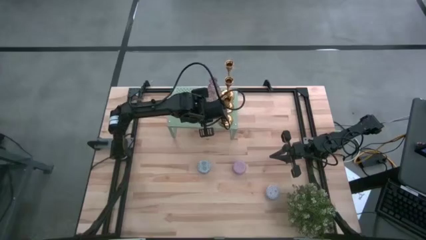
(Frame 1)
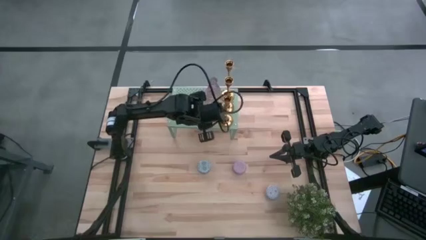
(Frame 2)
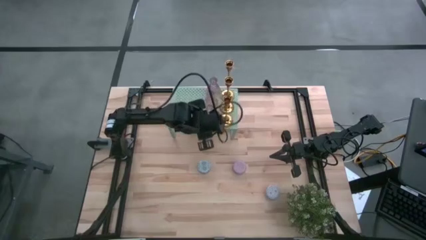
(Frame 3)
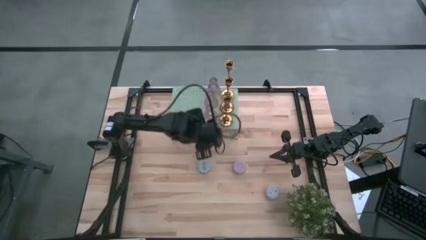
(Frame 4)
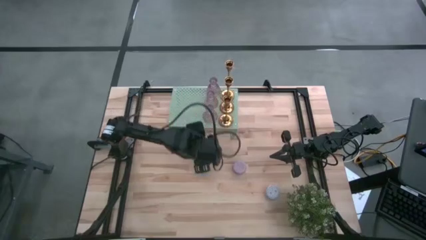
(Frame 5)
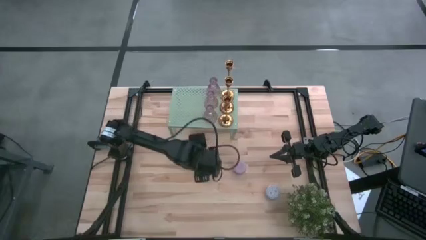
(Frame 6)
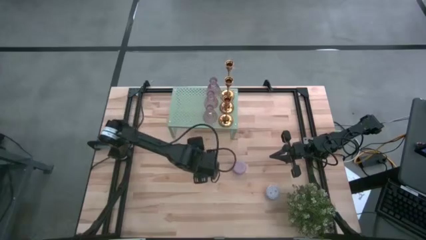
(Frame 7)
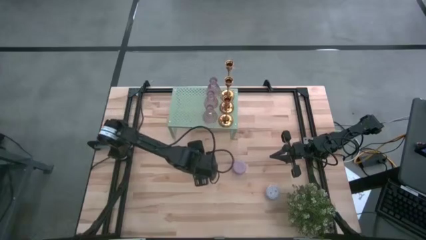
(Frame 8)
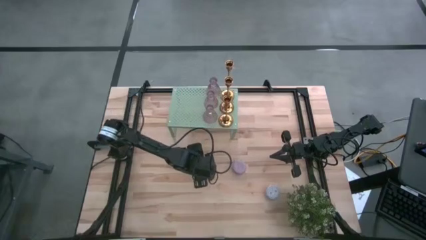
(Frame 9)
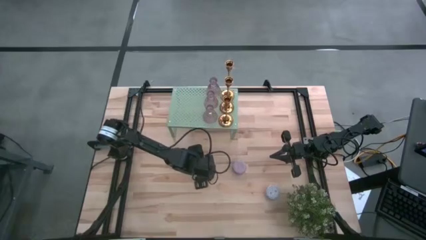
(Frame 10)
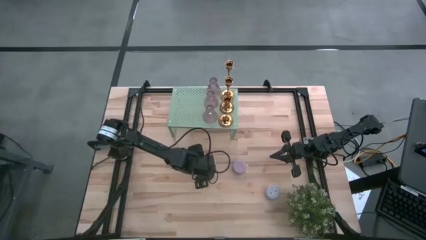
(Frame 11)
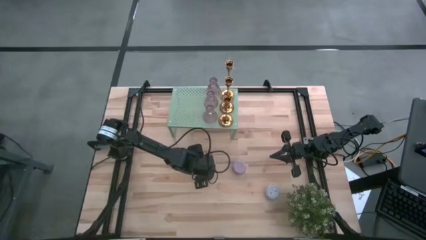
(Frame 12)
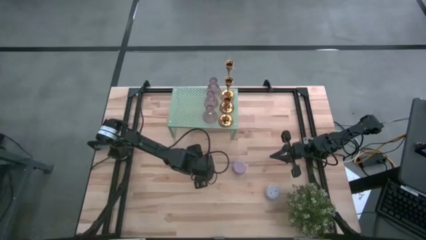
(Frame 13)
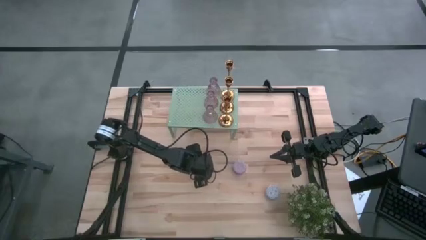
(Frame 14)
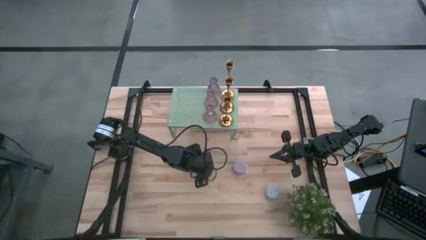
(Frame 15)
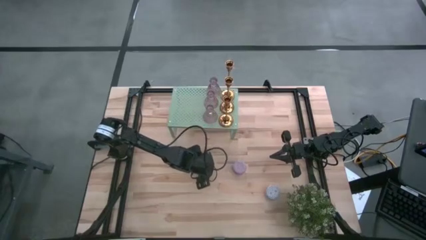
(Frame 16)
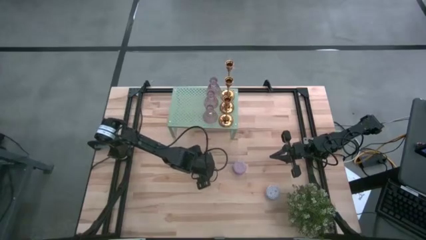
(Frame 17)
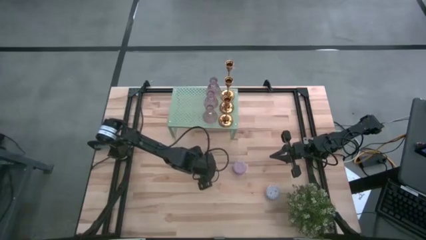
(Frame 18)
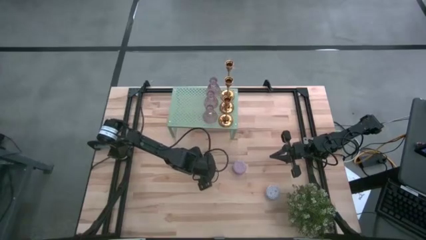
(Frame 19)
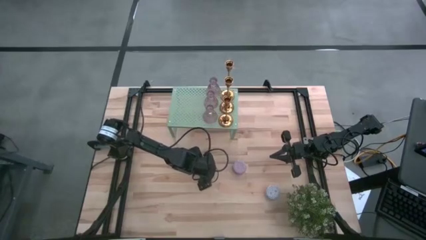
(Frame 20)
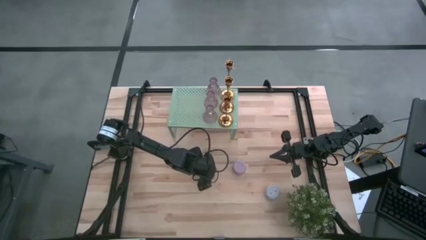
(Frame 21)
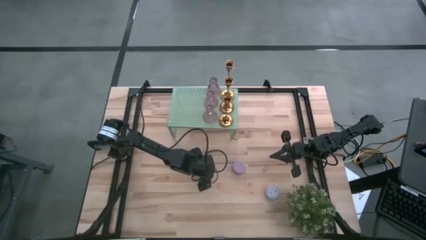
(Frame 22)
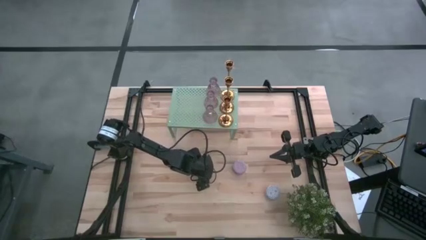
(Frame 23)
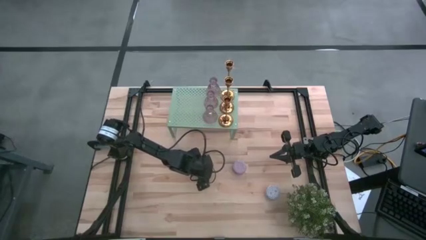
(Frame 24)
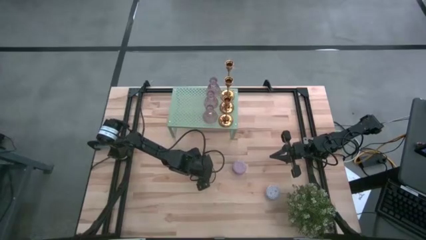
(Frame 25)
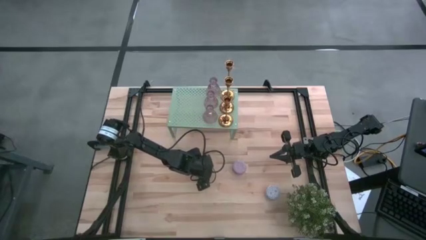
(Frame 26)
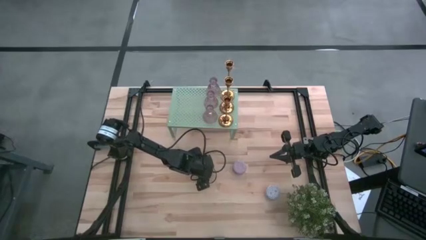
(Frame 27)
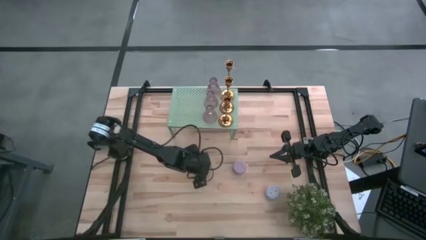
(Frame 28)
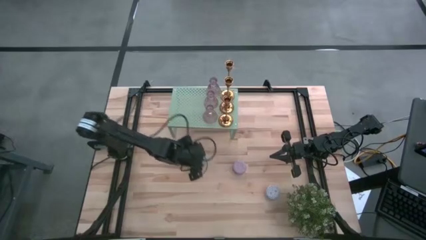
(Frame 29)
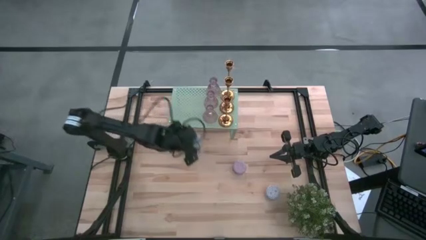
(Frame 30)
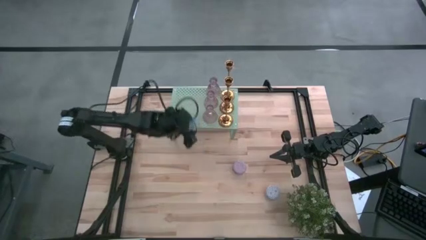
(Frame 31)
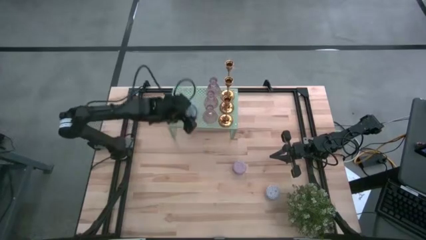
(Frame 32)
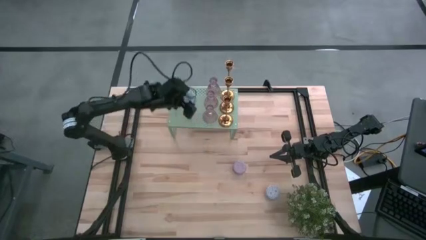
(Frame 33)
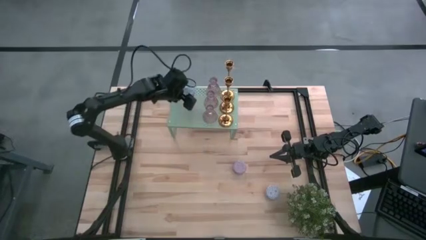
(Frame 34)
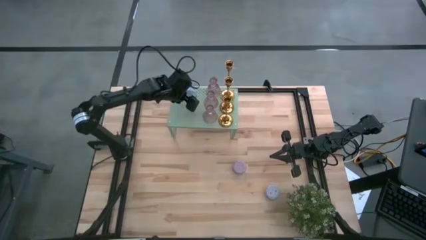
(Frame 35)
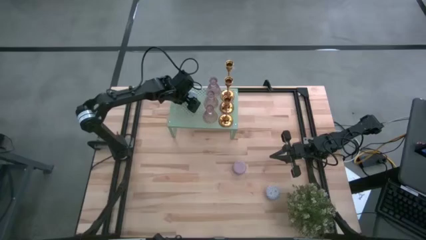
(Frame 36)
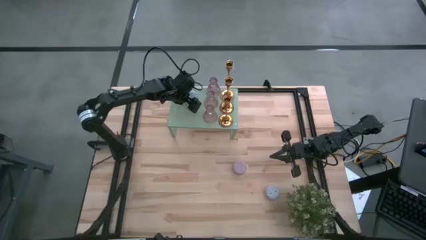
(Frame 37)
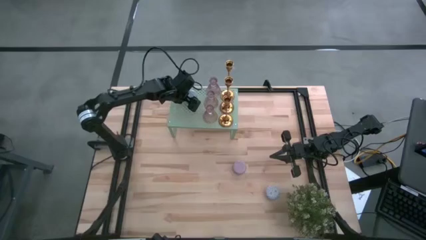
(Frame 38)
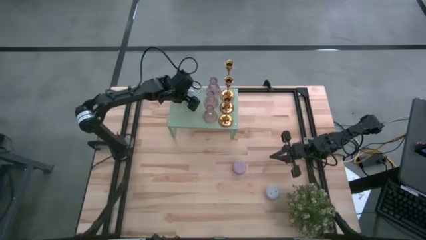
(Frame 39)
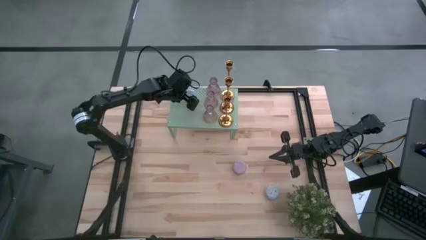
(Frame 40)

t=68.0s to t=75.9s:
Task: Pick & Place candle stick holders
Put the blue scented candle on the shelf

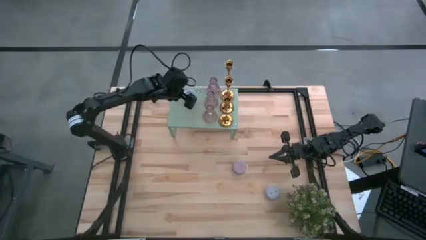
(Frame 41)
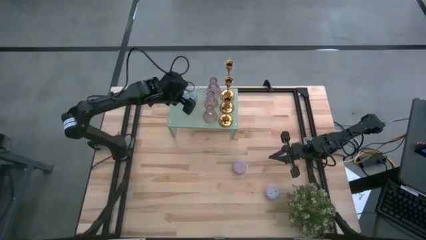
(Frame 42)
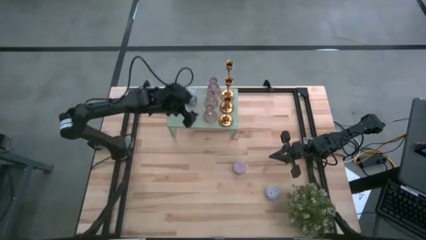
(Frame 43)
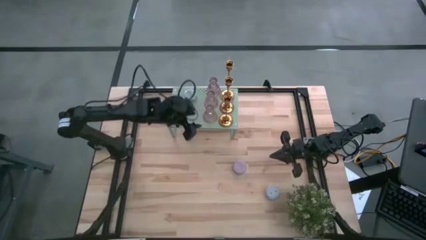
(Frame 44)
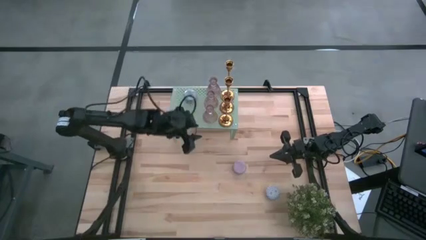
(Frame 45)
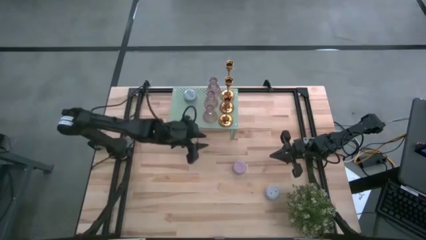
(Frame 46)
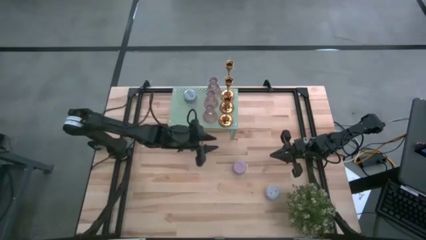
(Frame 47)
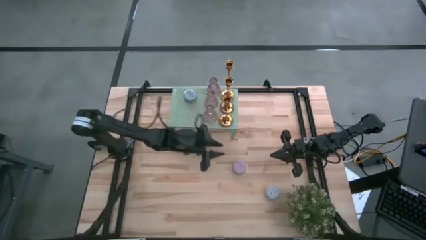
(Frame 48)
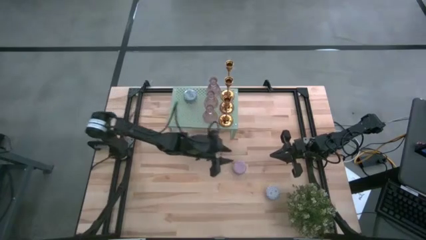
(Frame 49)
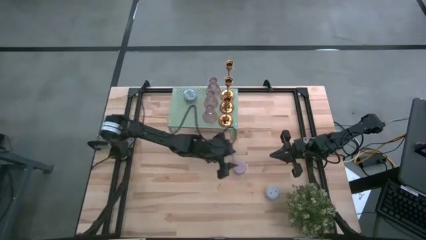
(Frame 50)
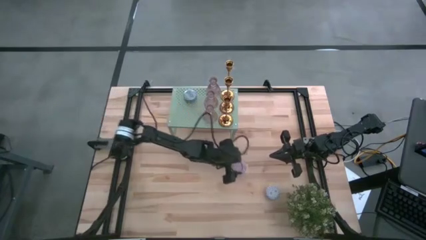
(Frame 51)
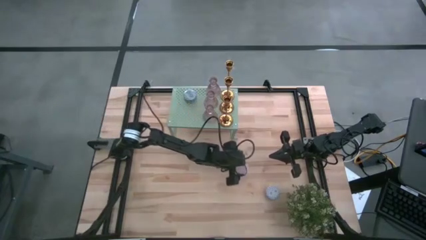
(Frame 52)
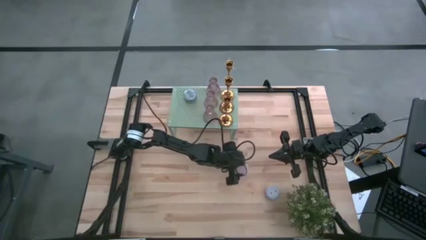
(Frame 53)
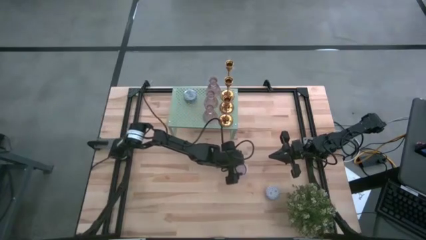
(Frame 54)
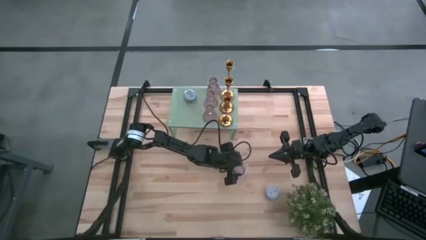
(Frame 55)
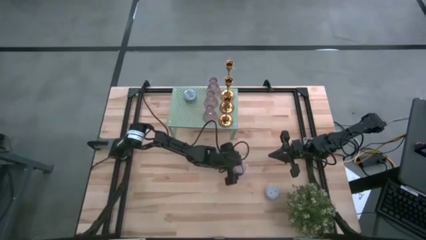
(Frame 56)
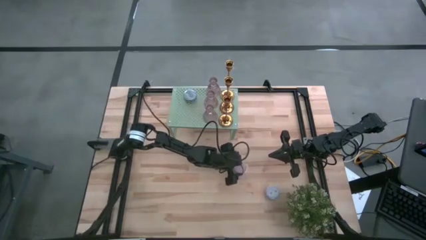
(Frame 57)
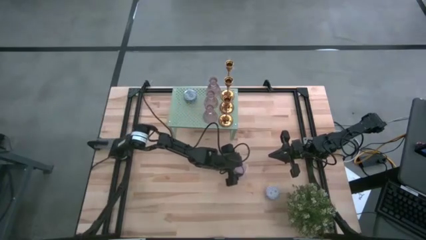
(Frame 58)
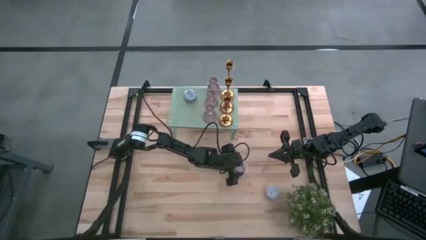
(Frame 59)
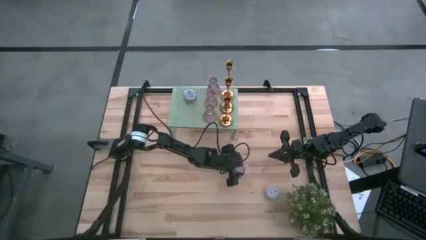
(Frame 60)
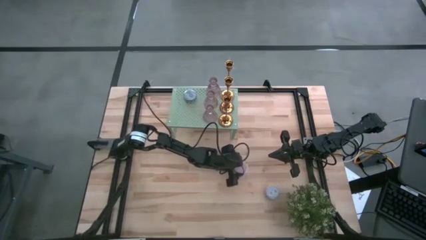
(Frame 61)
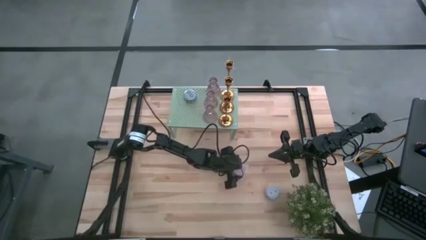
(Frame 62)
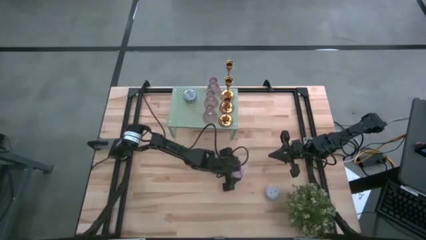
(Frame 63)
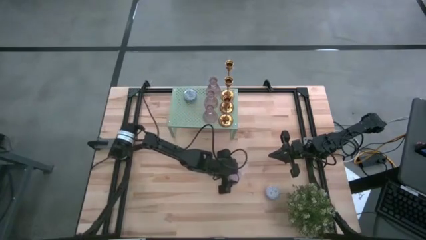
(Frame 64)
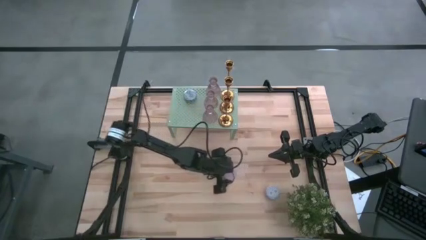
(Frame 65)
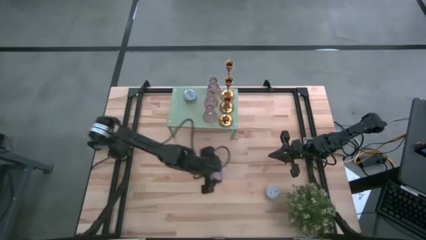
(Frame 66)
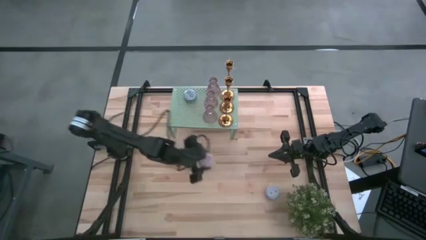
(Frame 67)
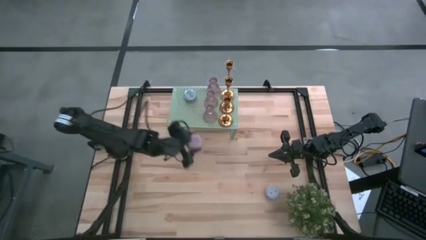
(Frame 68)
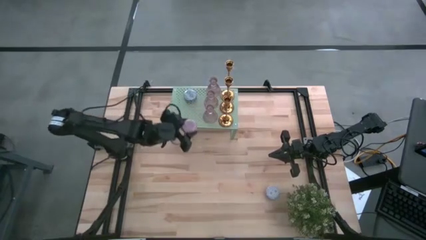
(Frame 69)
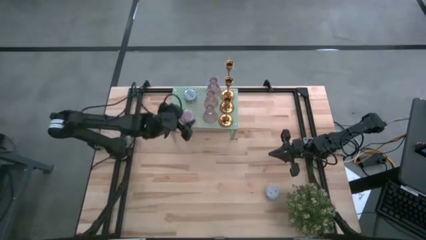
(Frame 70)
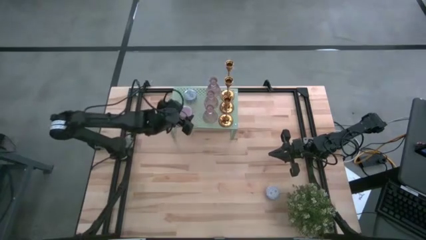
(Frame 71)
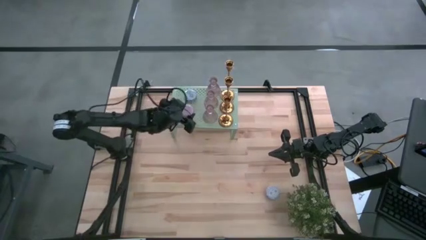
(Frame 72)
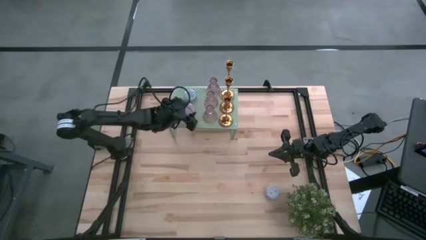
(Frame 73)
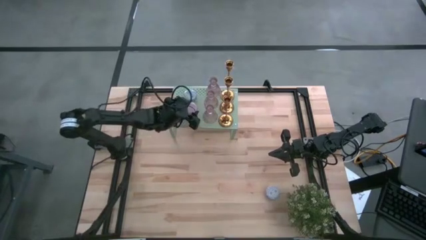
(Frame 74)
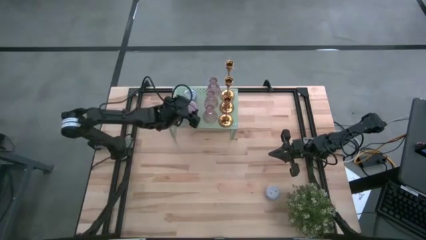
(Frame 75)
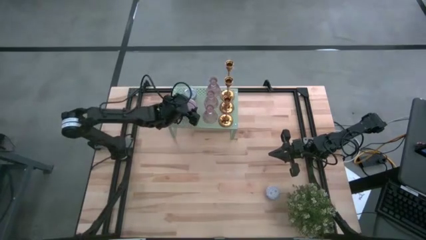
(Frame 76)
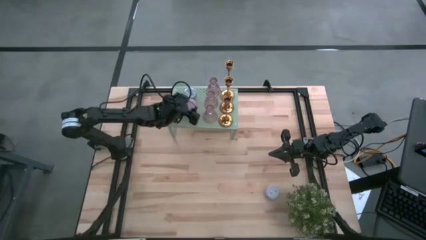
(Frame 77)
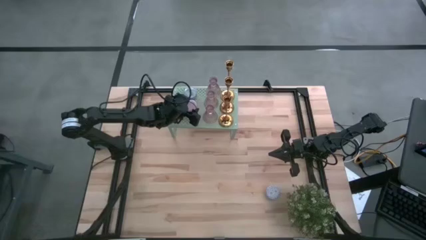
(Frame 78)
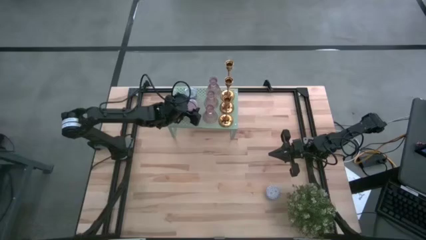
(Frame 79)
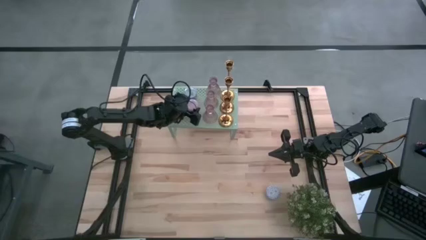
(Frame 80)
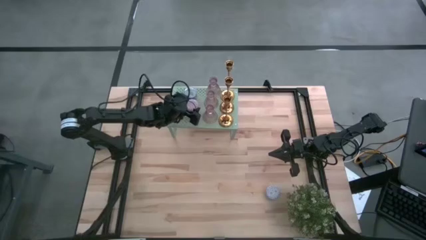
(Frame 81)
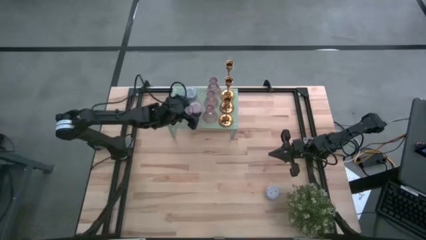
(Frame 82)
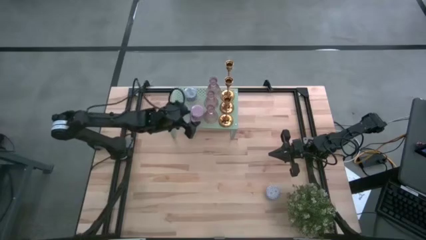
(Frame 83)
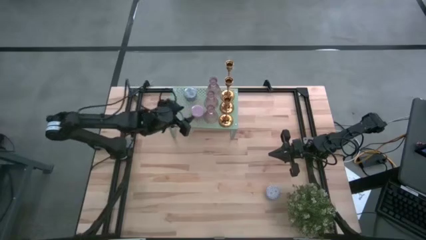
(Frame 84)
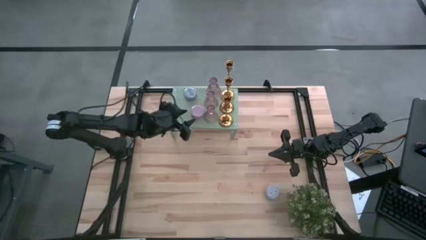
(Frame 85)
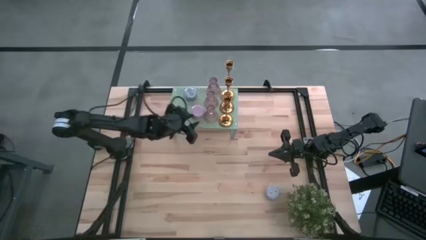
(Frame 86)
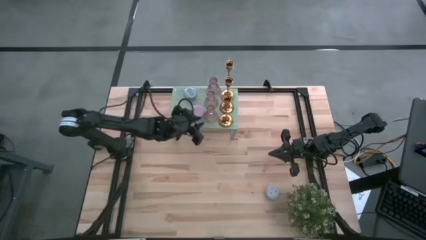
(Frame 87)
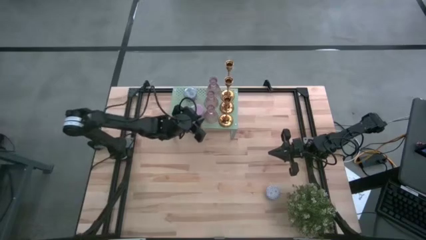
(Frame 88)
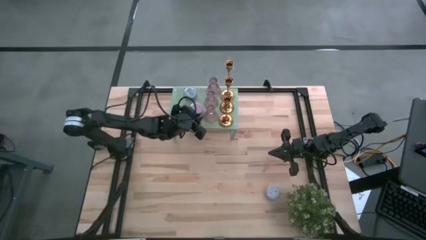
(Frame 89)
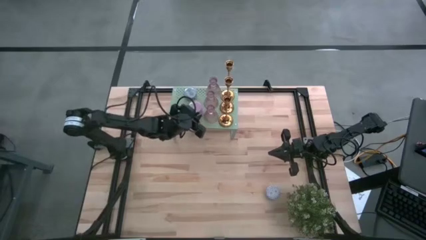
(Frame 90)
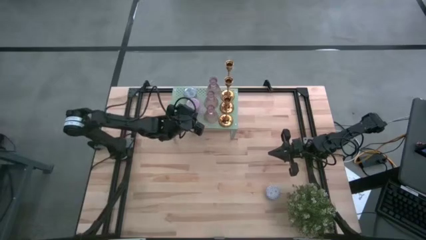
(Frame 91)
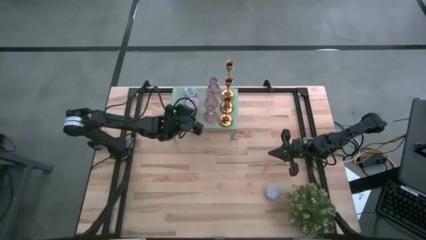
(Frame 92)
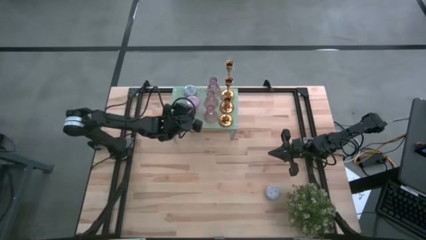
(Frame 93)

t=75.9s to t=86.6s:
Put the pink scented candle on the shelf aligned with the scented candle
